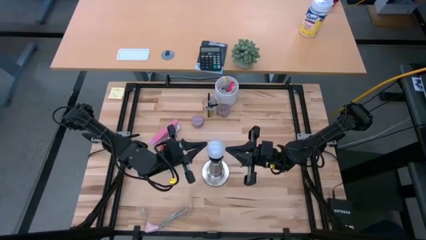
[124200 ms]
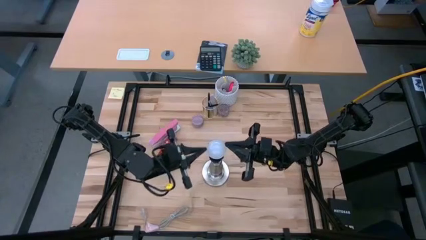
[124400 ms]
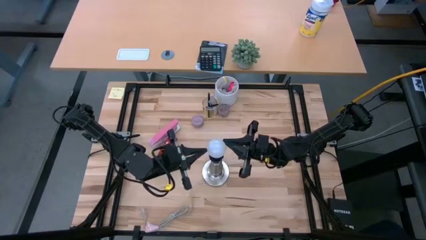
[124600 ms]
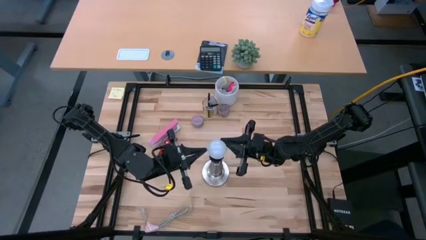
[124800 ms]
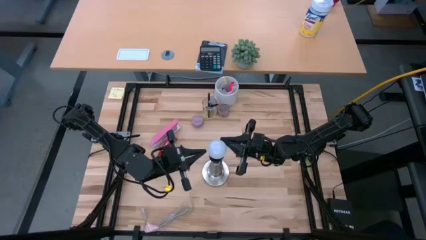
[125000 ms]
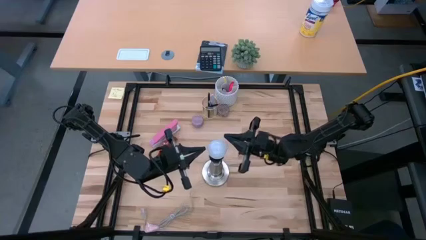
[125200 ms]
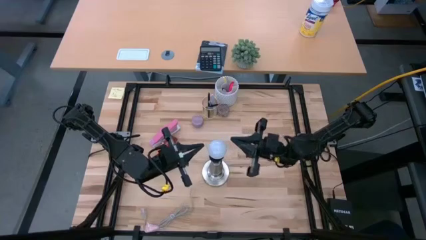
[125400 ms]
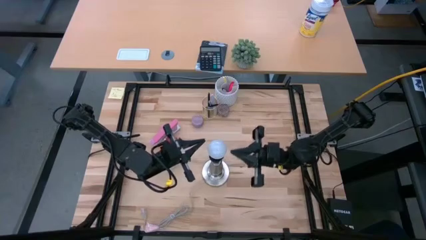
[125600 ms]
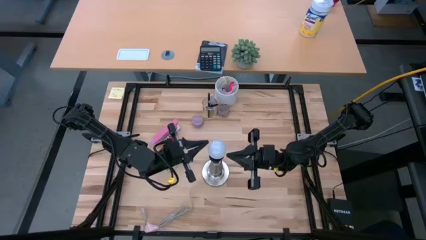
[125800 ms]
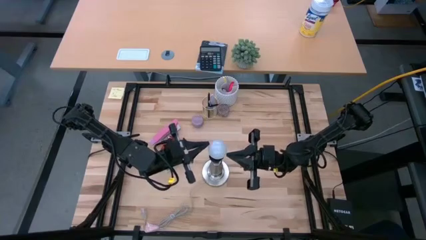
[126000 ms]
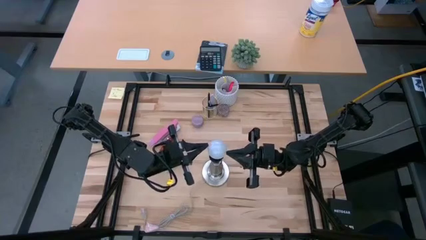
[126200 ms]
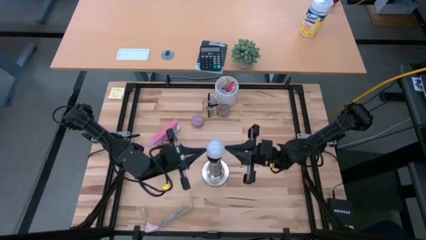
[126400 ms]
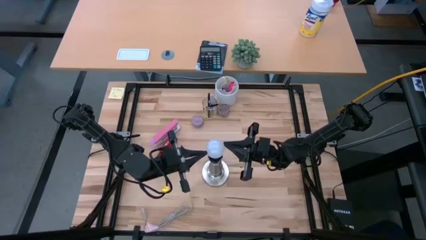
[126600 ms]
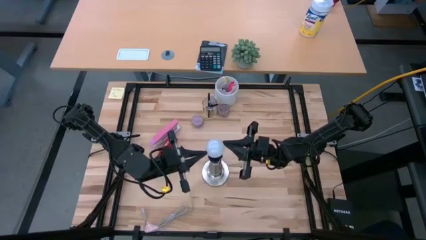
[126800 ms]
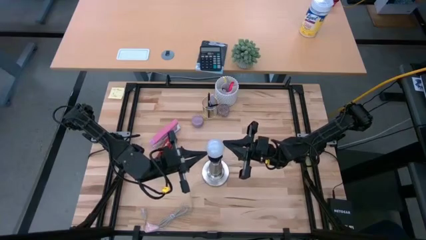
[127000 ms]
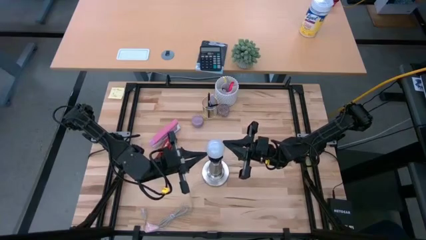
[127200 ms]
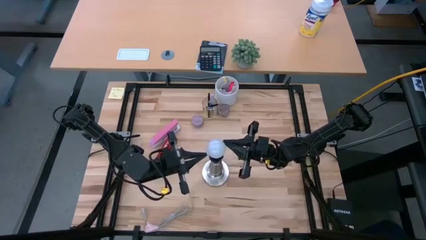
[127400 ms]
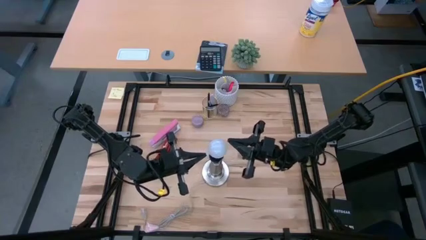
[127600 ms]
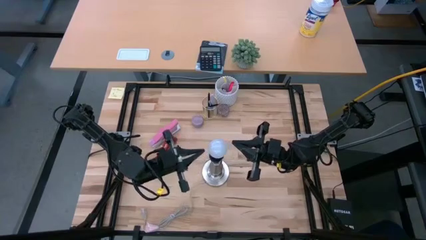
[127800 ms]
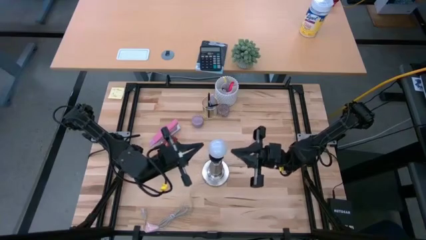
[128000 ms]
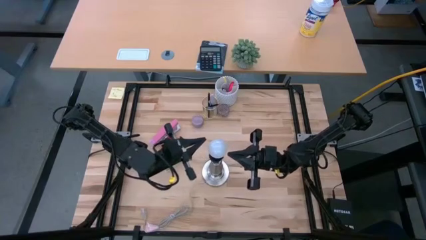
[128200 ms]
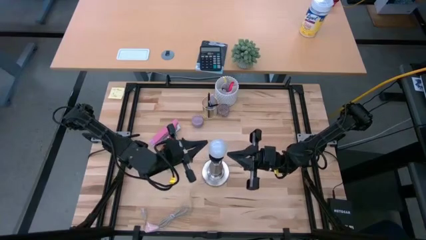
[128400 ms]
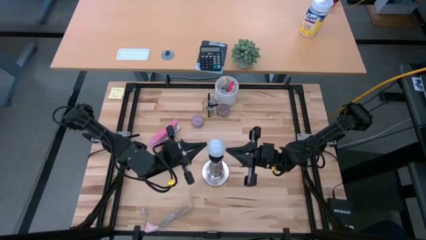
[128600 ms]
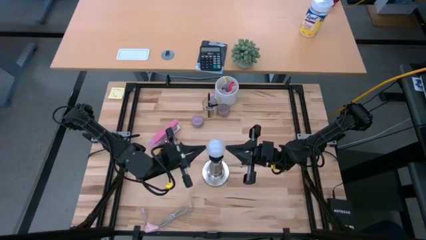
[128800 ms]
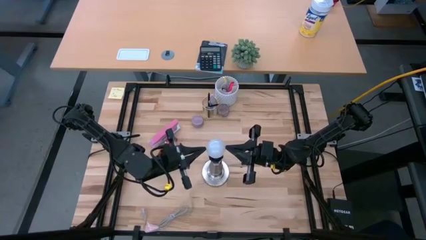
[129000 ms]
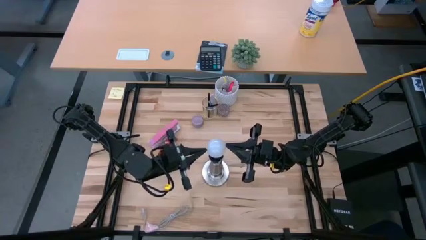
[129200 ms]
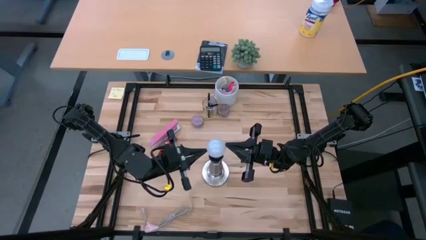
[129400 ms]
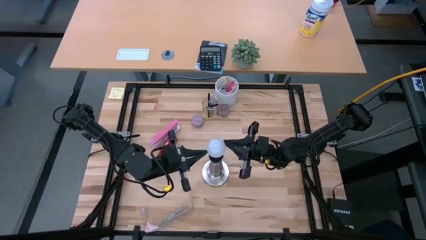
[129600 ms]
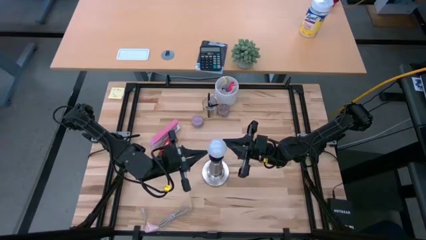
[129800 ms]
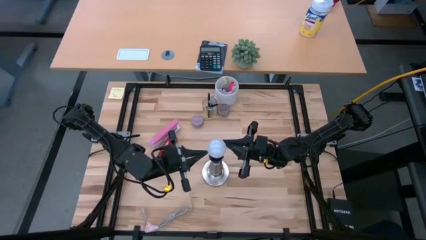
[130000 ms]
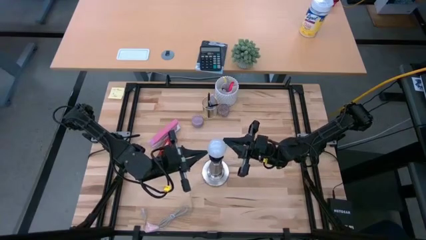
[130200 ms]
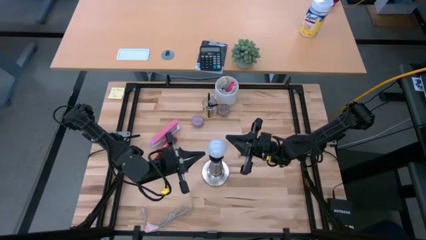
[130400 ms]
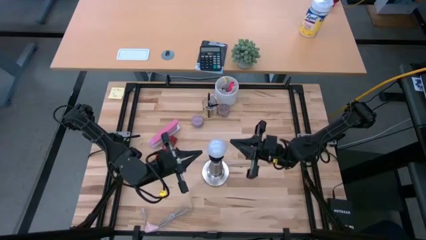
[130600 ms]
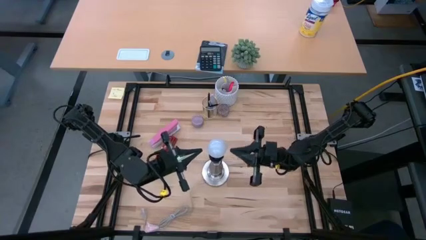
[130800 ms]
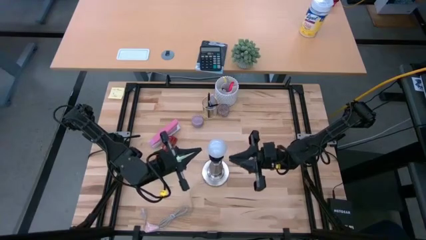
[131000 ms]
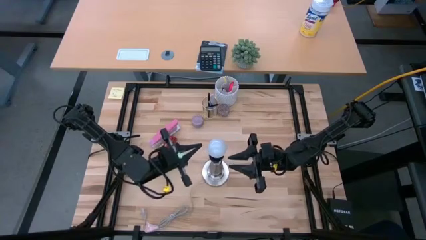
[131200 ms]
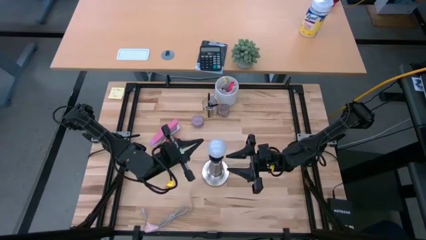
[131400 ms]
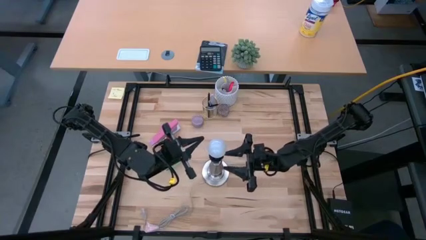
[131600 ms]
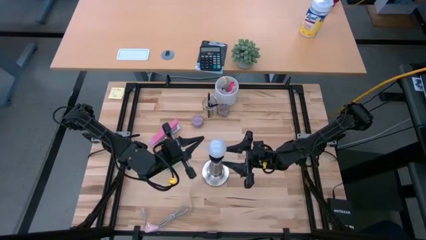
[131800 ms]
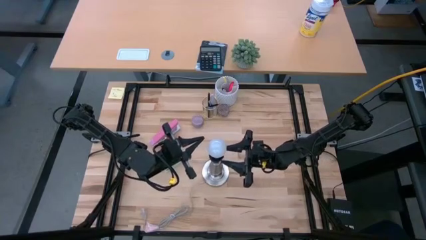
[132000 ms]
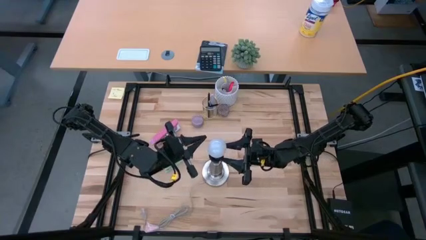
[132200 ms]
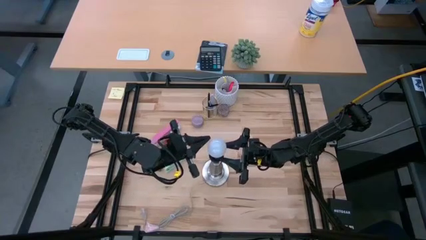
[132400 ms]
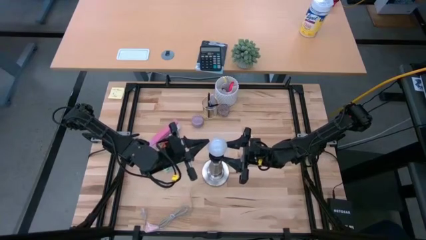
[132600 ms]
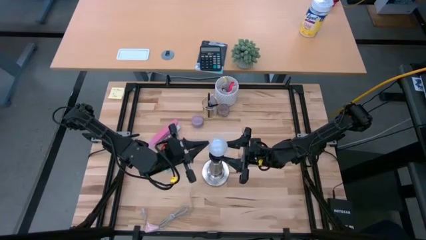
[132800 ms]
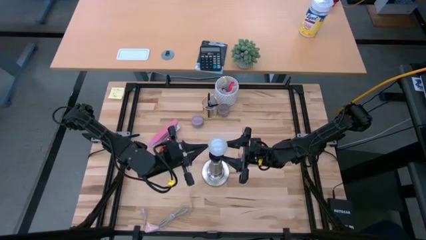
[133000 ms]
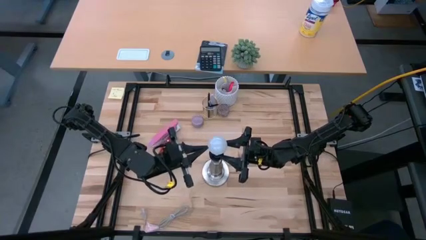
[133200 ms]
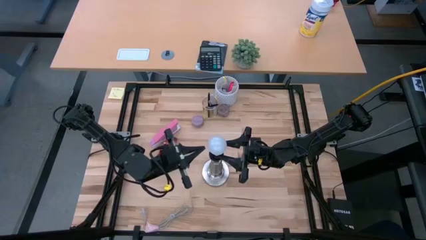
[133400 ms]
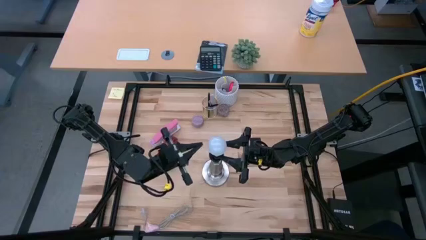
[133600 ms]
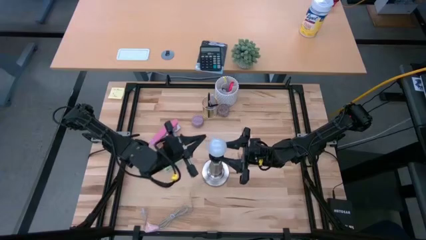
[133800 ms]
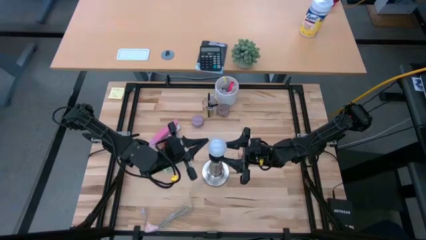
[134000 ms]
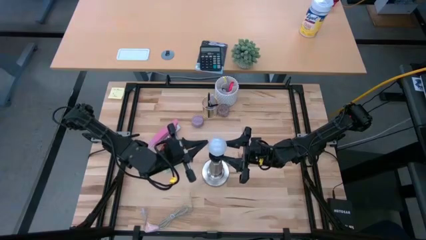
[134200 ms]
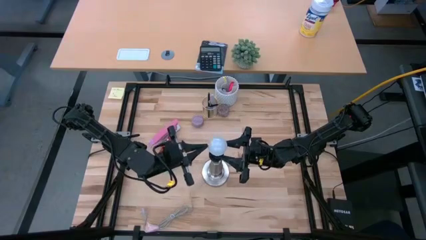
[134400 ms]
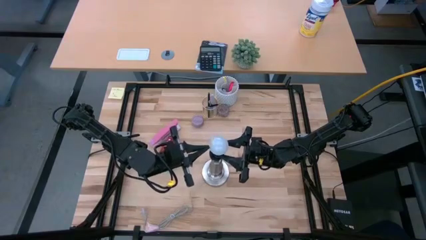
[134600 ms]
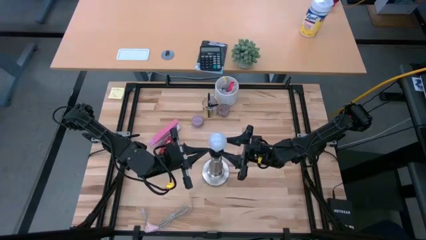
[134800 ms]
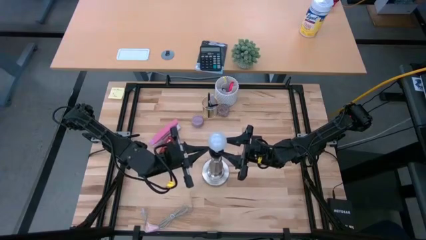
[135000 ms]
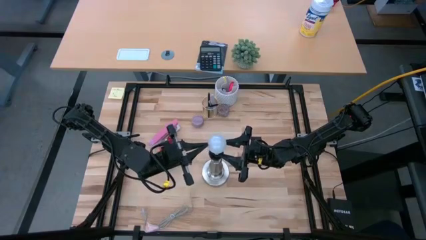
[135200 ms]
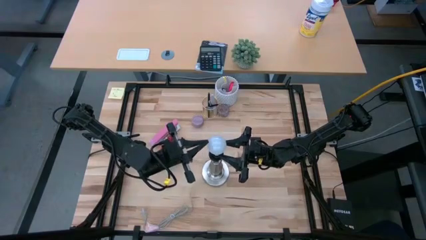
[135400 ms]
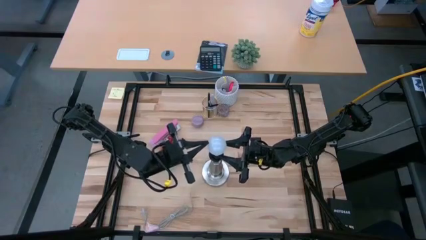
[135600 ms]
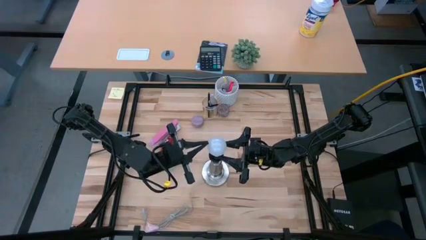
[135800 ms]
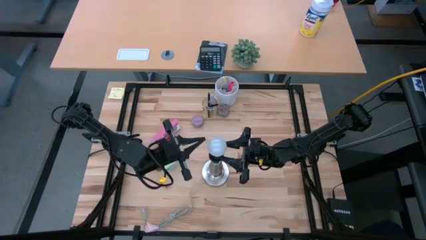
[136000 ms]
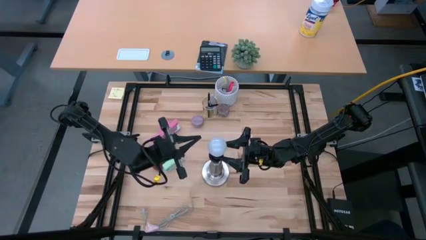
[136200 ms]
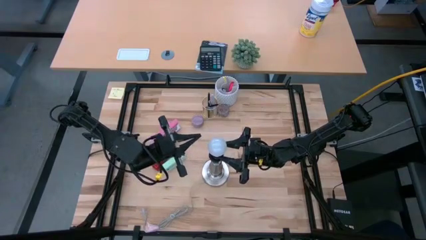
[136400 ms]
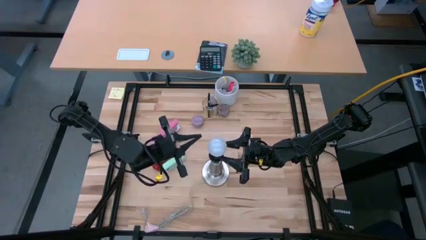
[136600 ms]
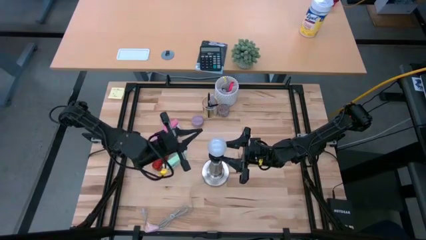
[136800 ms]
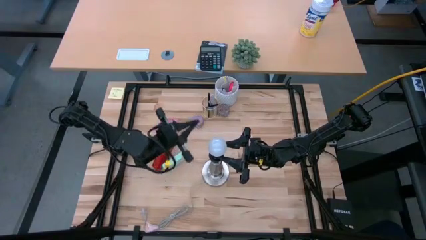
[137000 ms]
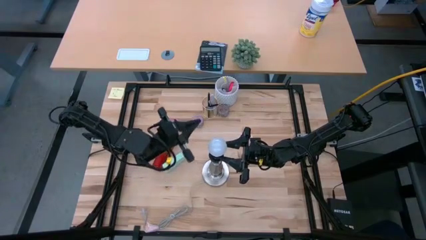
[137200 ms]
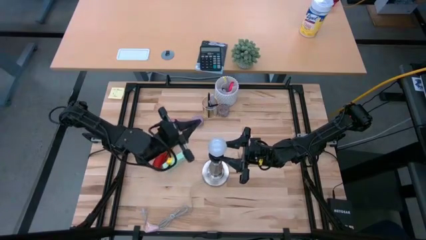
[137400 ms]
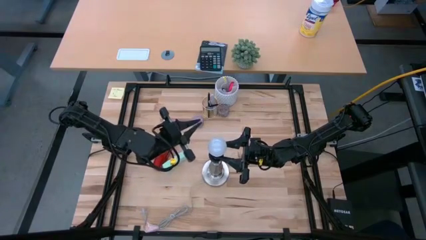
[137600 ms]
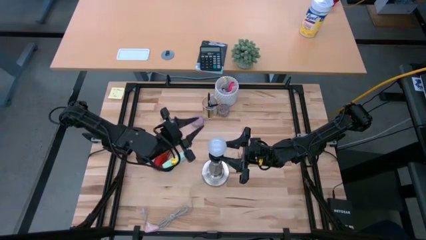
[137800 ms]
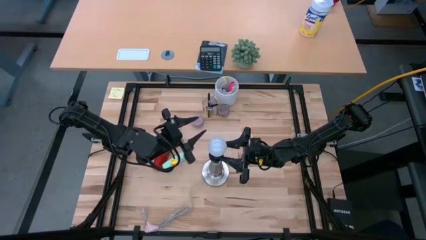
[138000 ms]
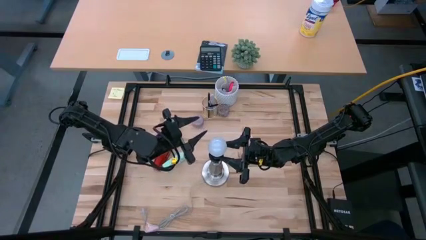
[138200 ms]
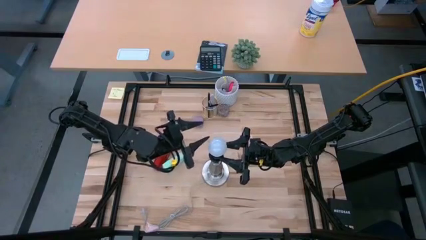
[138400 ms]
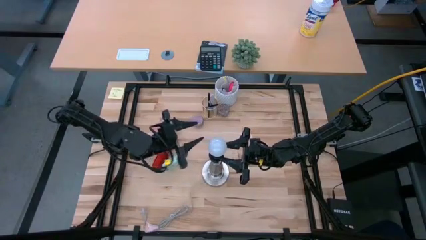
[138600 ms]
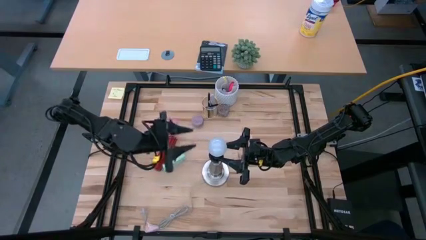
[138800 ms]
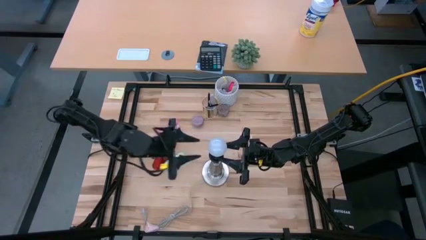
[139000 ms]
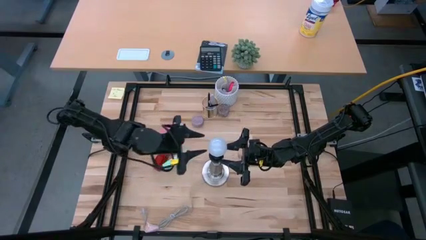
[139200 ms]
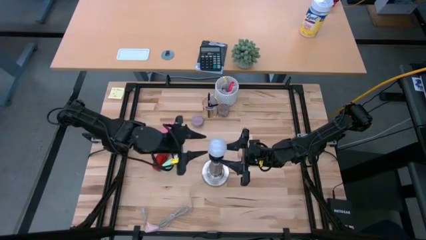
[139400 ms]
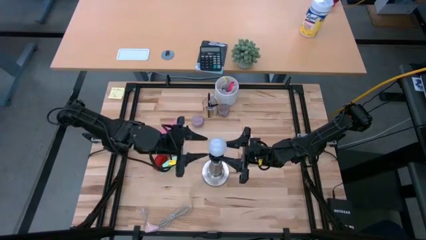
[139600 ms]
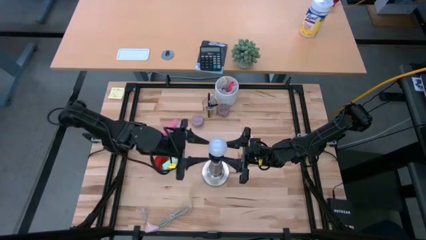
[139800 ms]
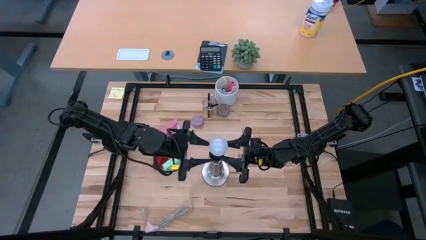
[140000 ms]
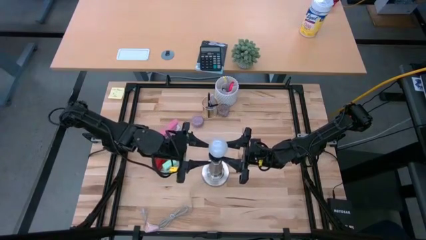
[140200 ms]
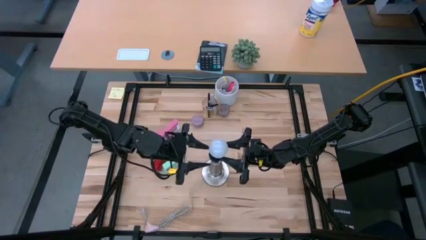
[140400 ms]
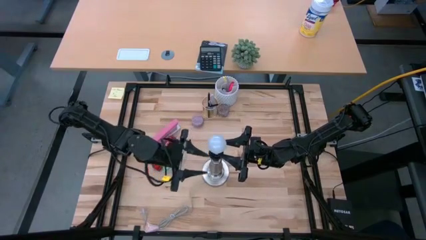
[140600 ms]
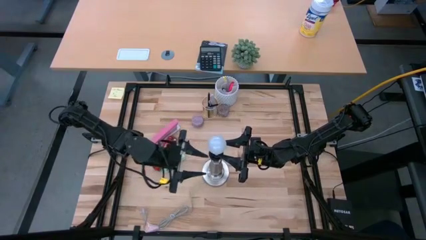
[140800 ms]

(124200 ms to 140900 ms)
Task: Screw lightbulb
Remove the lightbulb from the lamp
